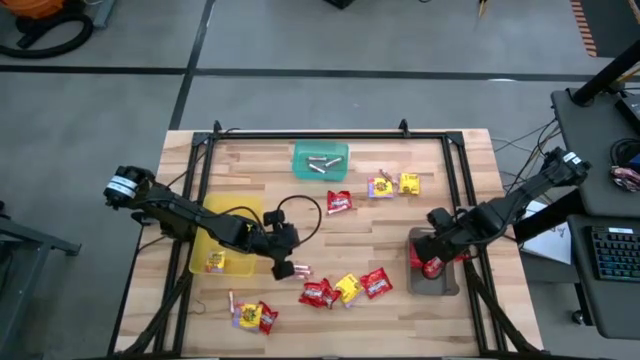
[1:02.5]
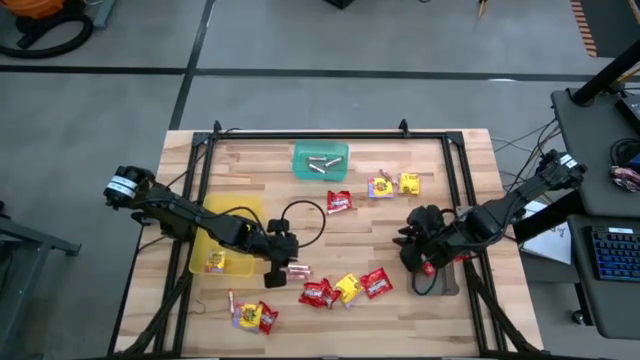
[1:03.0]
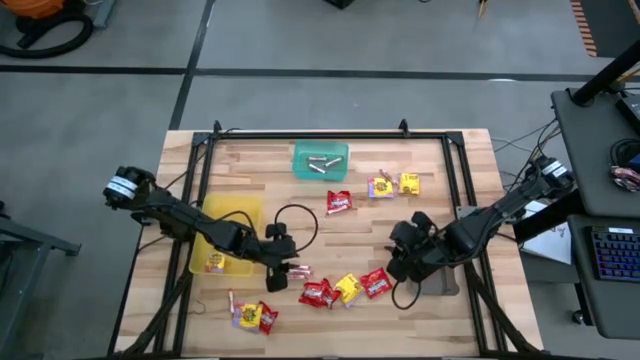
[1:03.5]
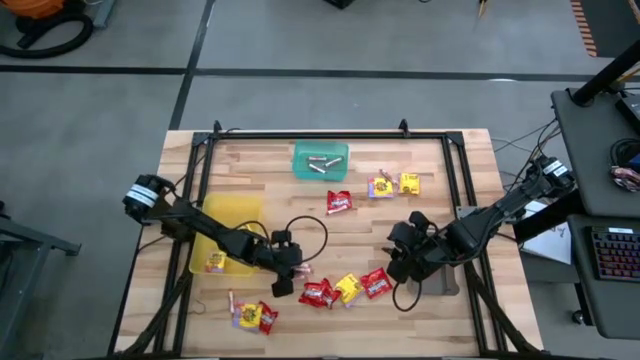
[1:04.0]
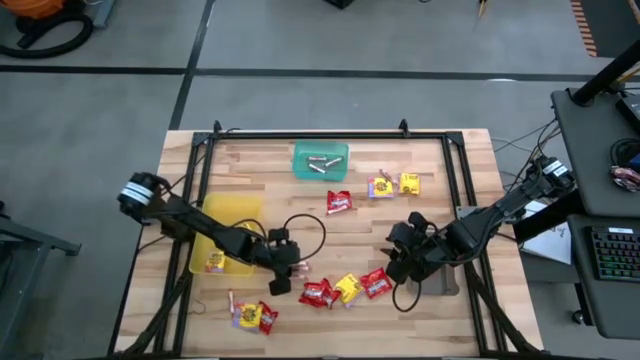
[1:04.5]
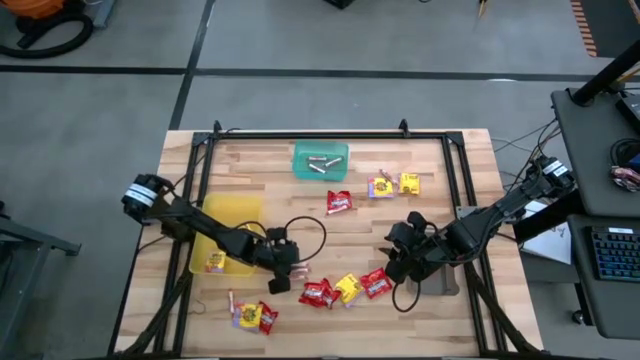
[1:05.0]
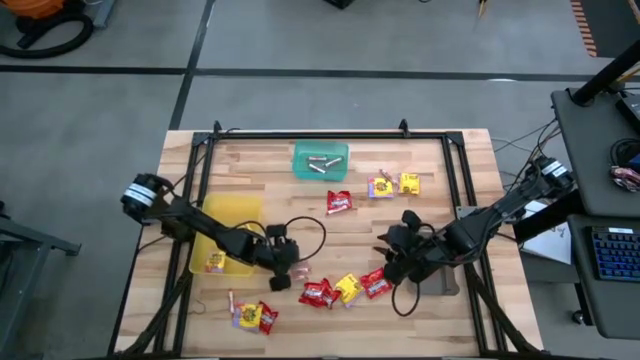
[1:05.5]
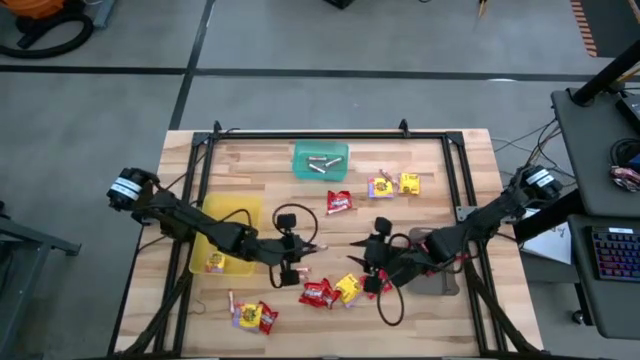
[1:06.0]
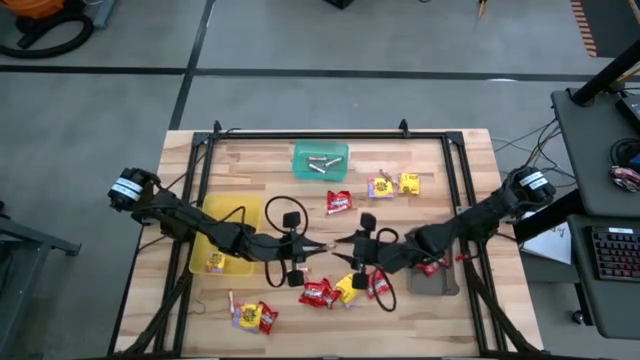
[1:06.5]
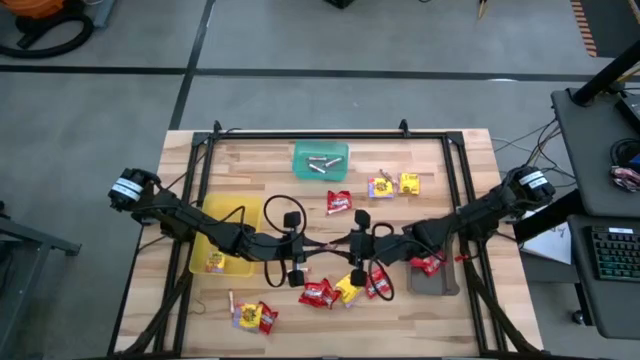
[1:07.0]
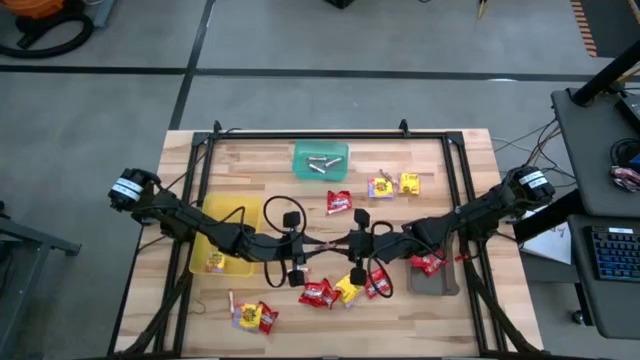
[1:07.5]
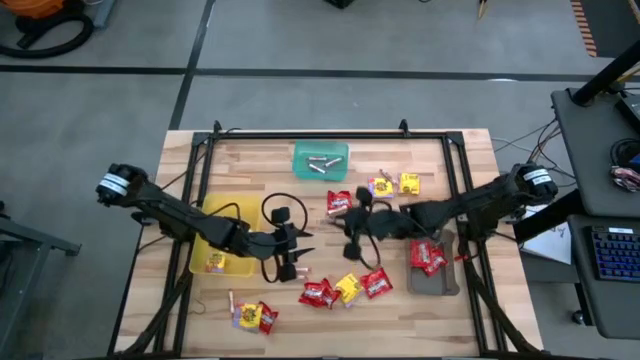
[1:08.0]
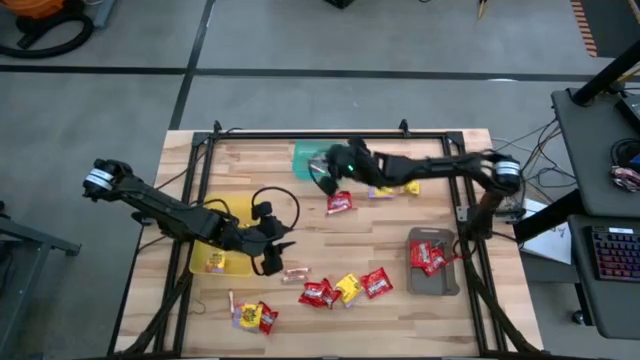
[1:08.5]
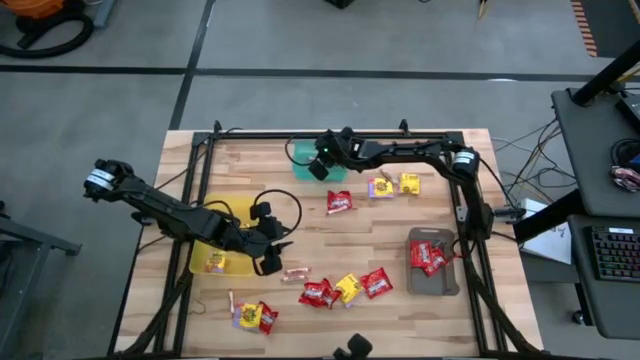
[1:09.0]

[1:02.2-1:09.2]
Task: Sort candy
Put the white candy into the green bin

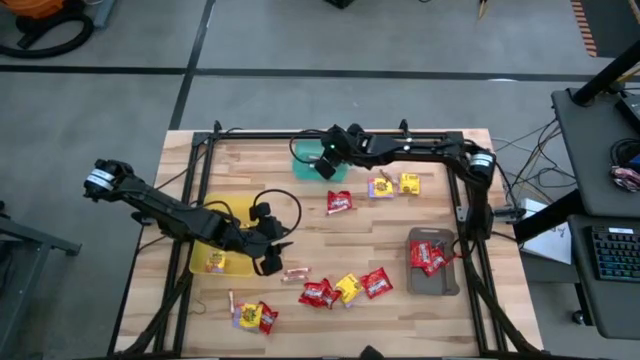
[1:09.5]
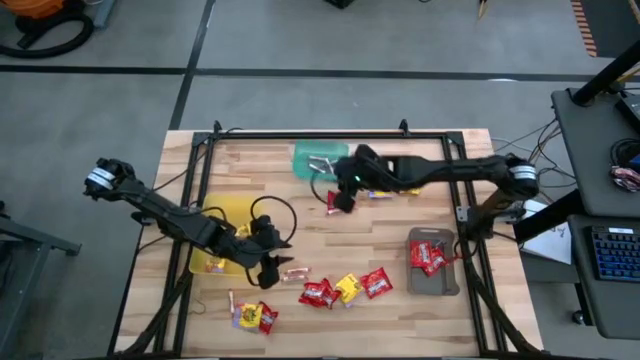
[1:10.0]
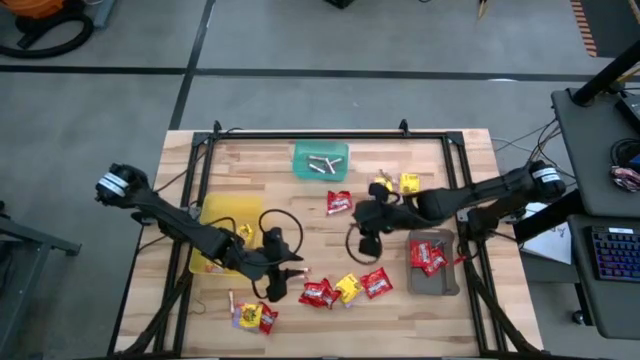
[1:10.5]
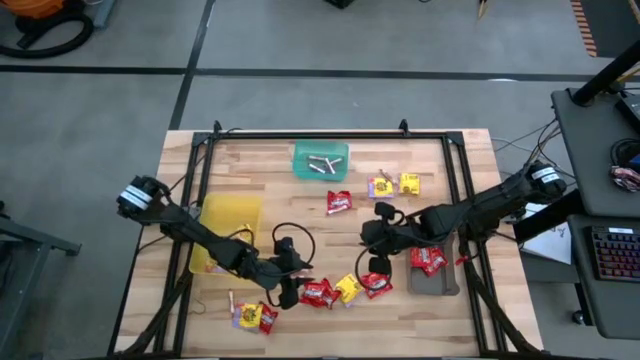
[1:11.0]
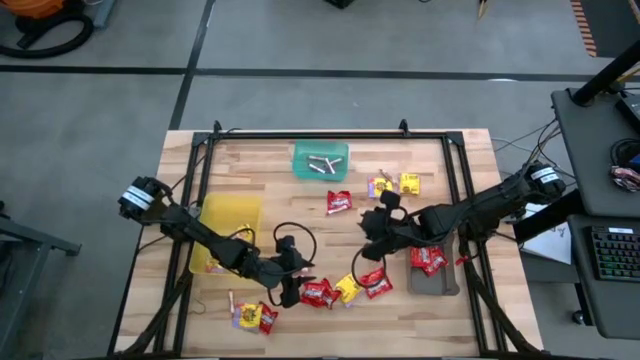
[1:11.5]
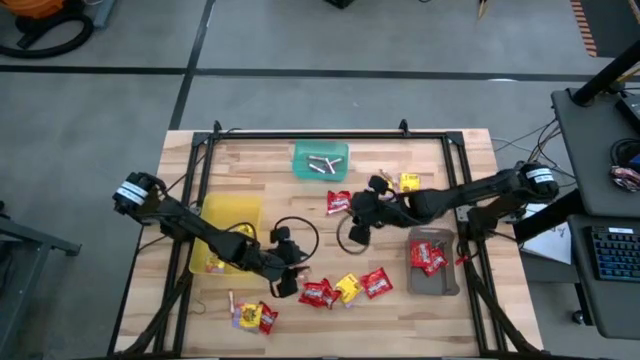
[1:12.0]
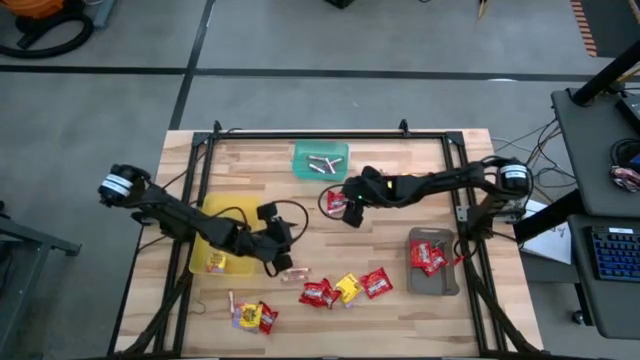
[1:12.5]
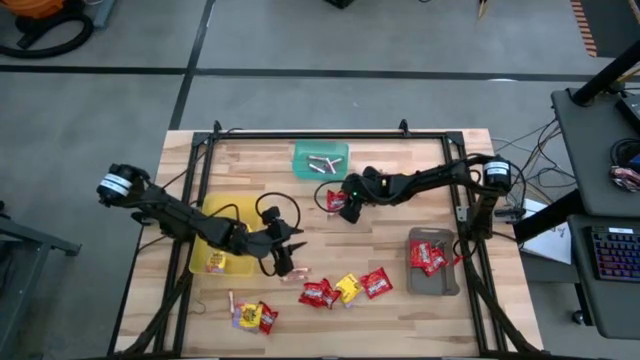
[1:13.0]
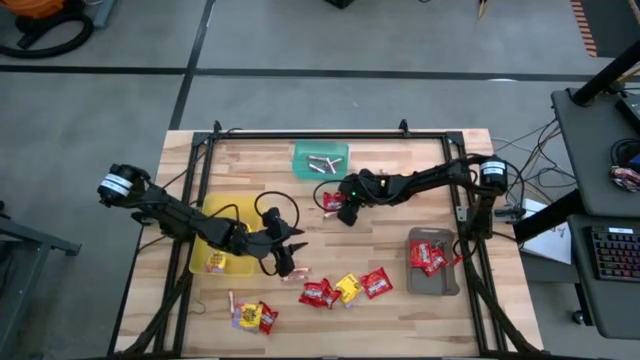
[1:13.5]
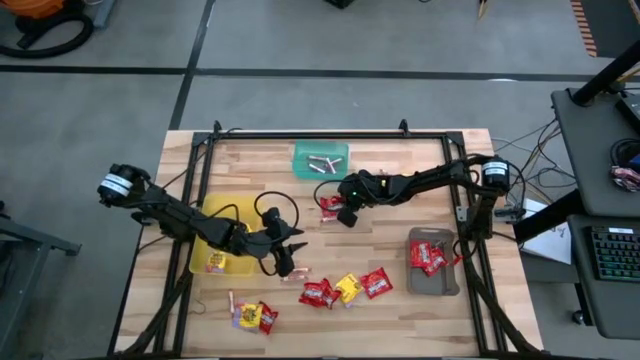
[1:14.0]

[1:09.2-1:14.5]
Put the red candy into the black bin

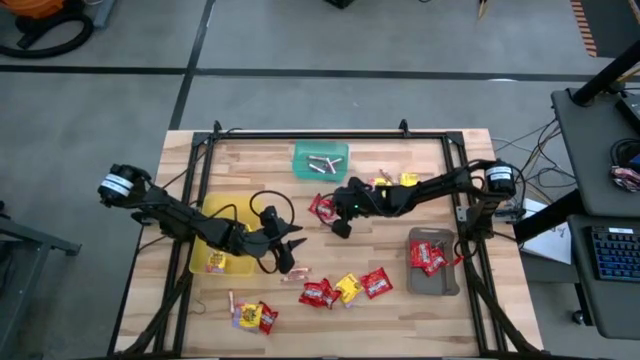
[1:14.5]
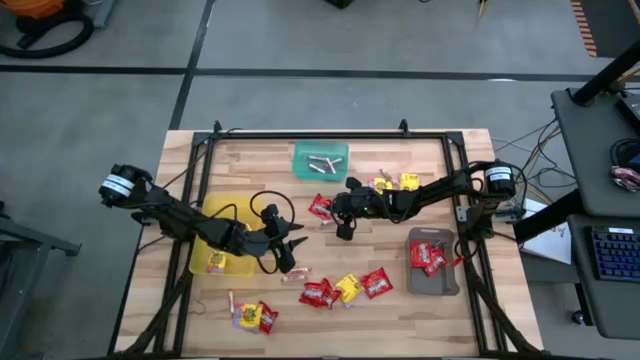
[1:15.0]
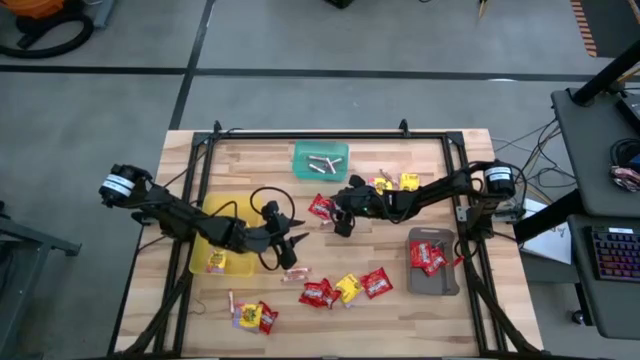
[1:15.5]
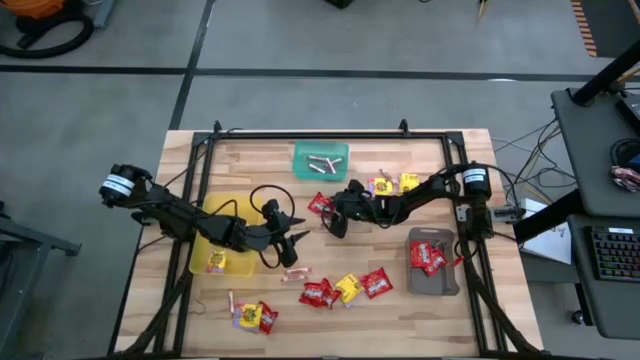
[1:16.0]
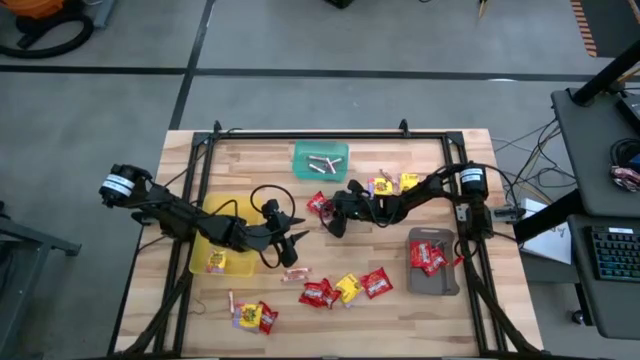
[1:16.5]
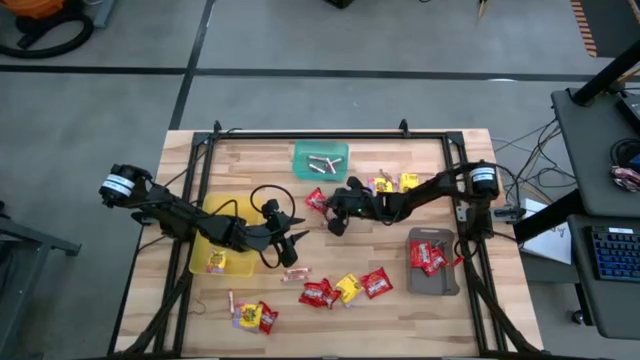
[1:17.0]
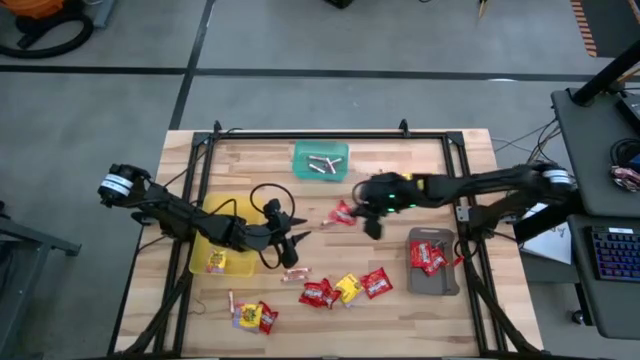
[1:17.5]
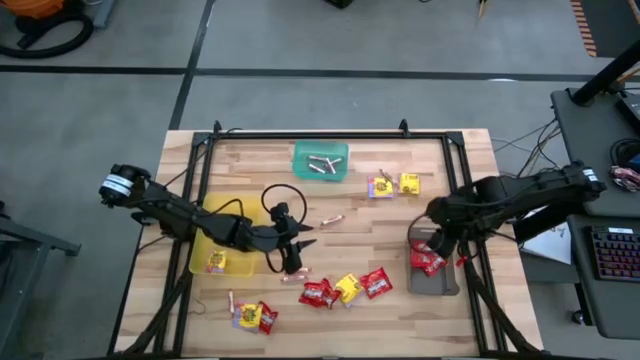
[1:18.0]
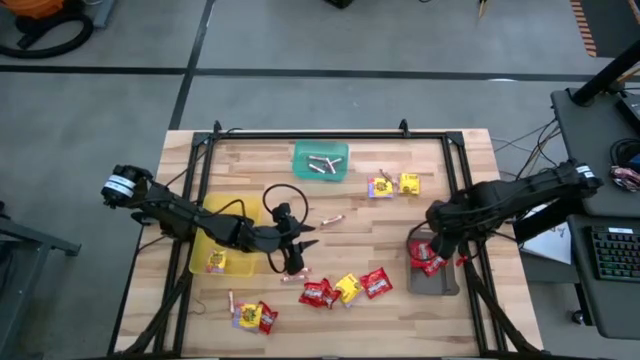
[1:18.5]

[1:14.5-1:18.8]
Put the red candy into the black bin

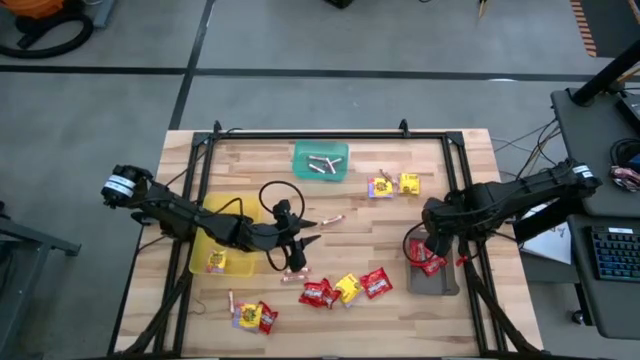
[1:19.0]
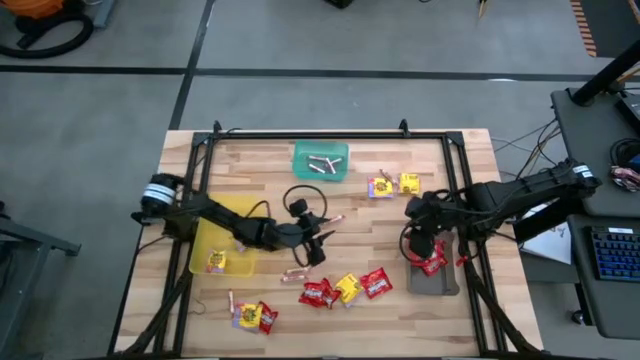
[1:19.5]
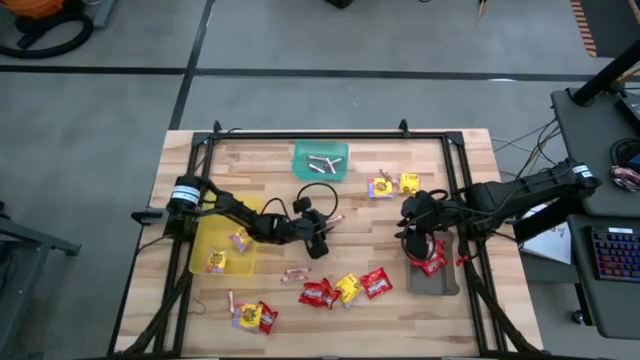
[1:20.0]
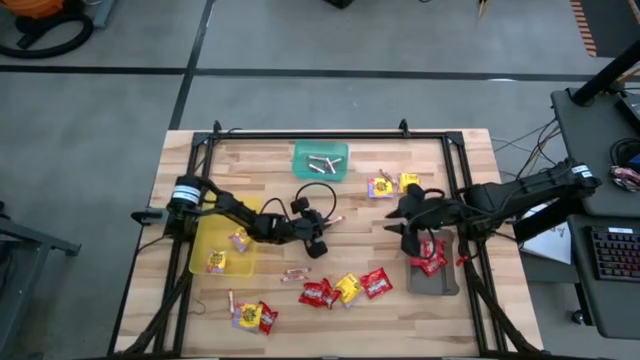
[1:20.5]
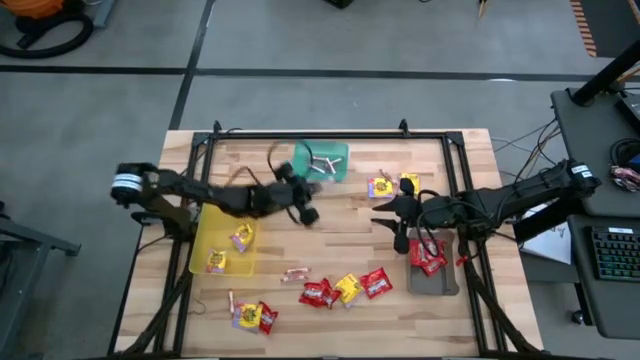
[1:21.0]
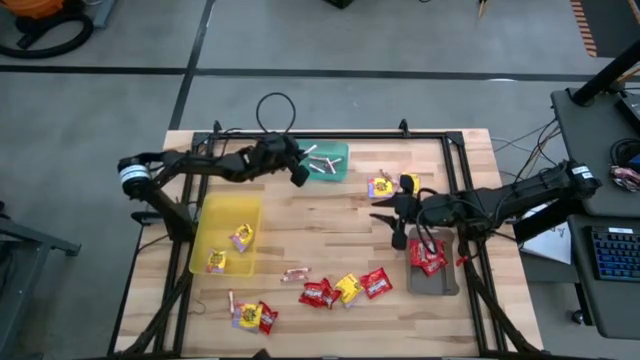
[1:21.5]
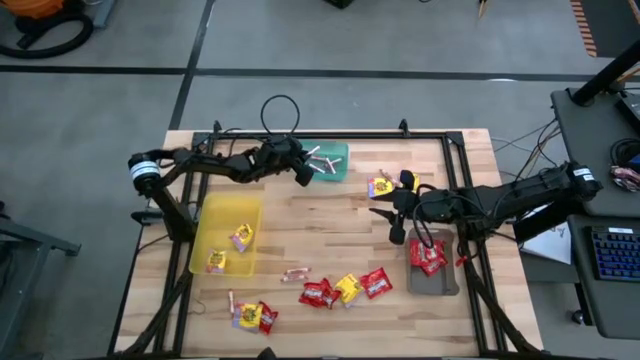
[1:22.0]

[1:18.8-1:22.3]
Put the white candy into the green bin

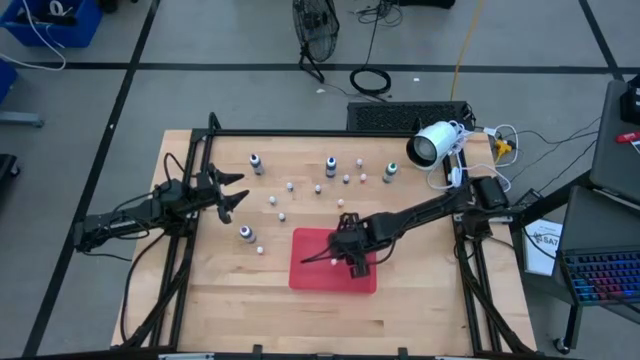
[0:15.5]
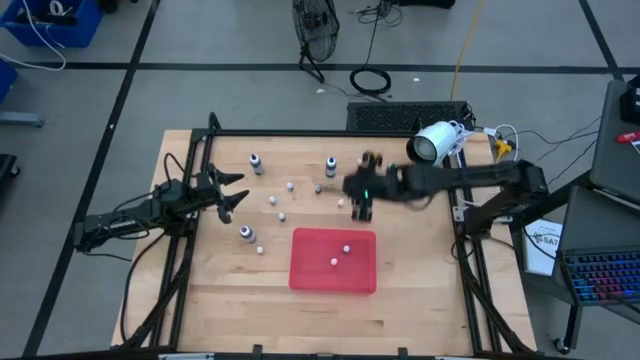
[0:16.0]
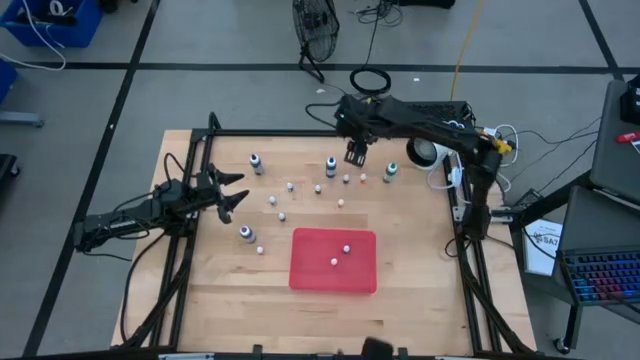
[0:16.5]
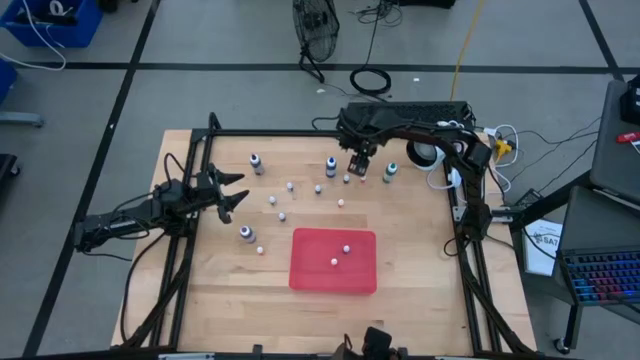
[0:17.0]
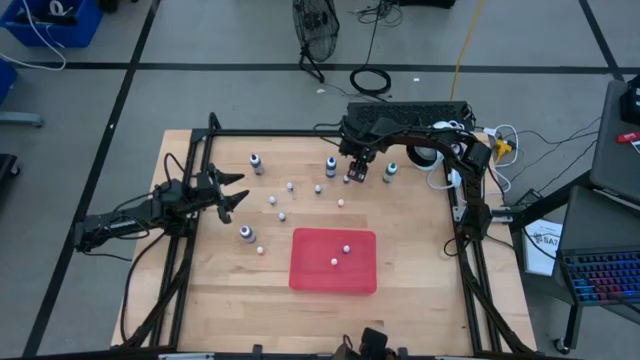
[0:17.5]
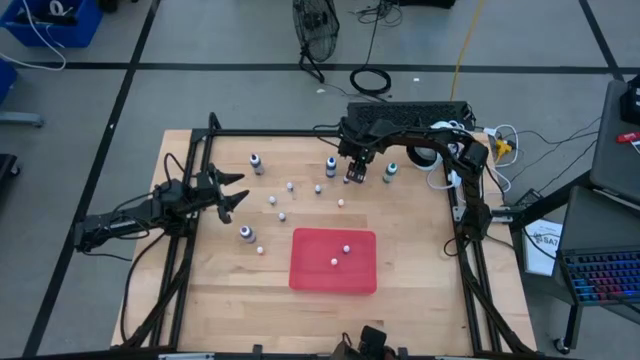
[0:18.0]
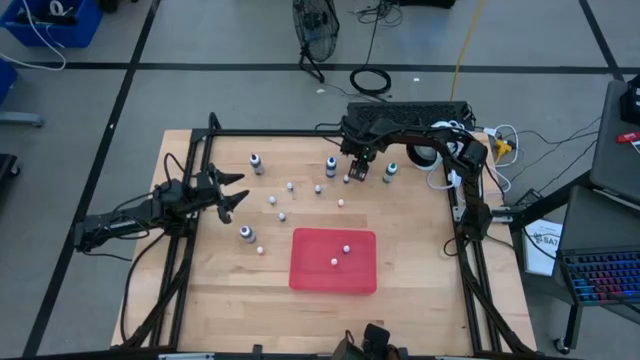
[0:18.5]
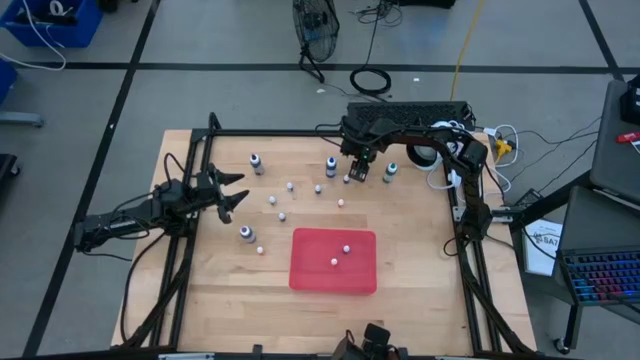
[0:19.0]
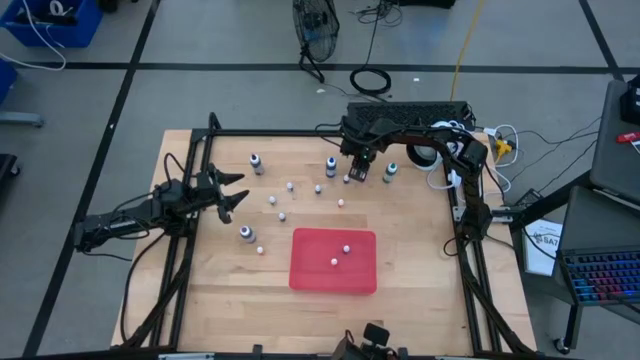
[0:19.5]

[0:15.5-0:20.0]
Task: Pick & Place food coloring
Put the small orange food coloring bottle into the red bin
